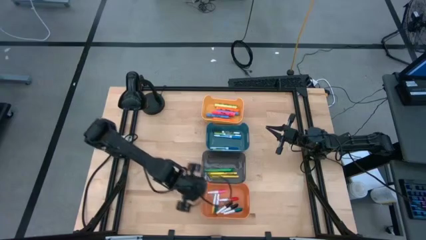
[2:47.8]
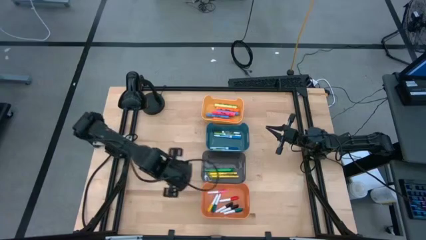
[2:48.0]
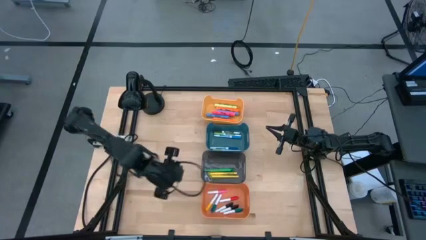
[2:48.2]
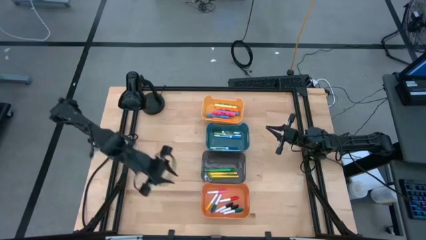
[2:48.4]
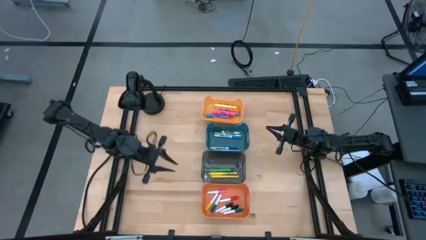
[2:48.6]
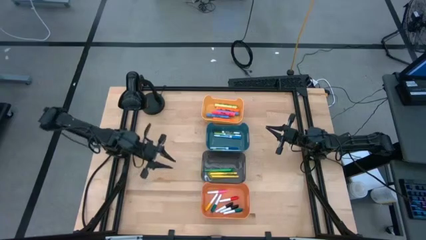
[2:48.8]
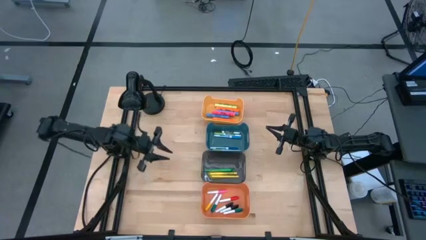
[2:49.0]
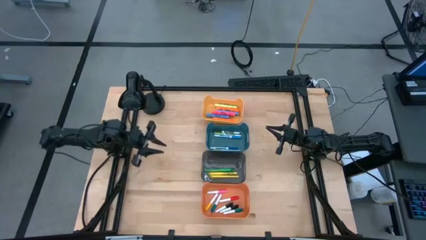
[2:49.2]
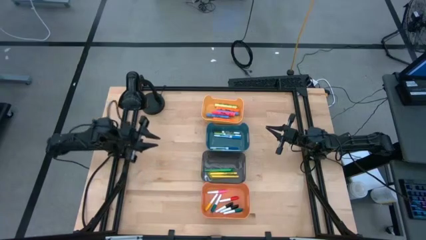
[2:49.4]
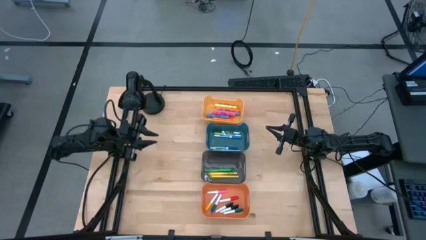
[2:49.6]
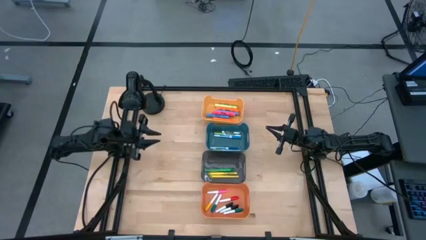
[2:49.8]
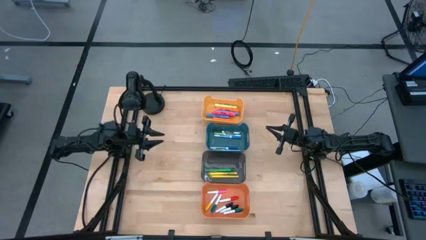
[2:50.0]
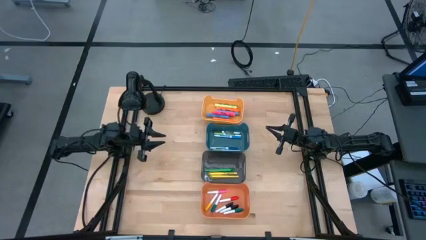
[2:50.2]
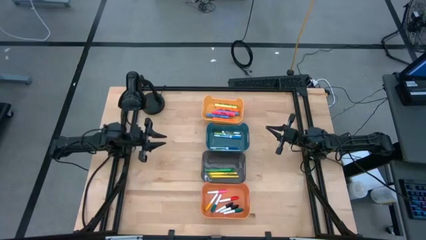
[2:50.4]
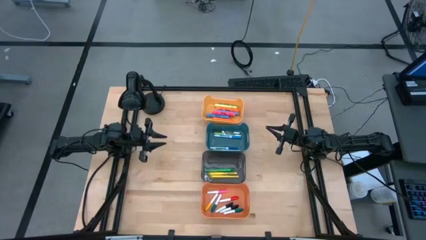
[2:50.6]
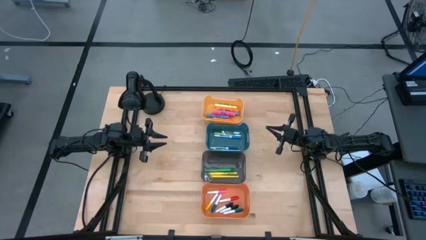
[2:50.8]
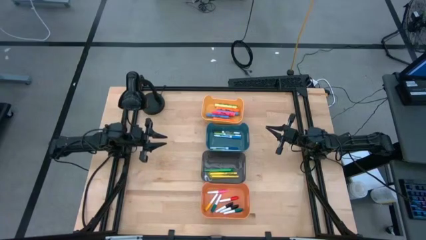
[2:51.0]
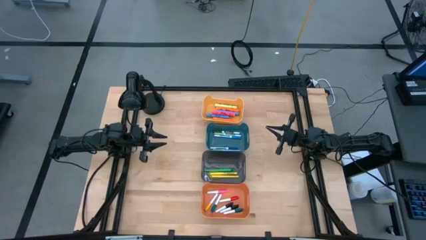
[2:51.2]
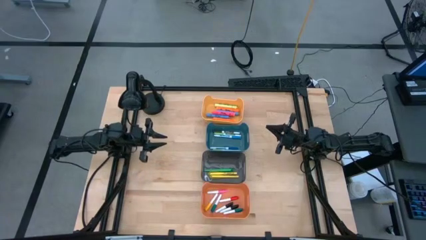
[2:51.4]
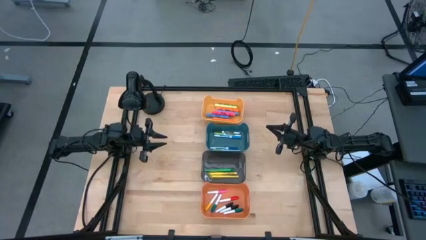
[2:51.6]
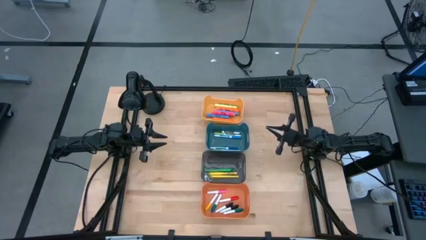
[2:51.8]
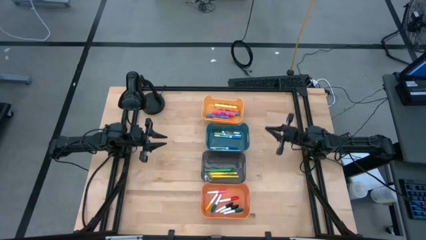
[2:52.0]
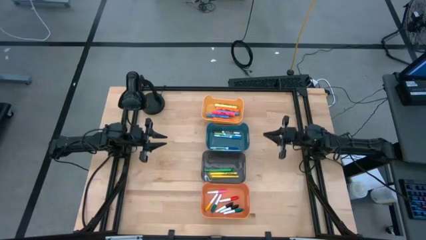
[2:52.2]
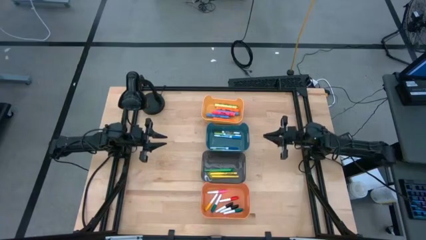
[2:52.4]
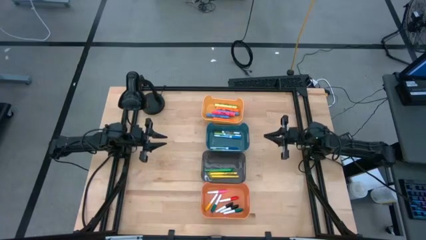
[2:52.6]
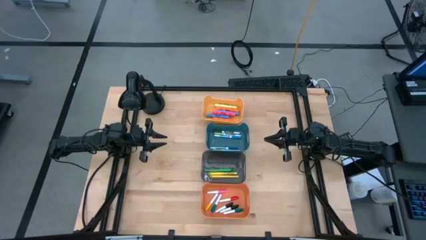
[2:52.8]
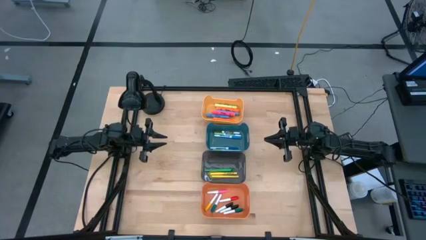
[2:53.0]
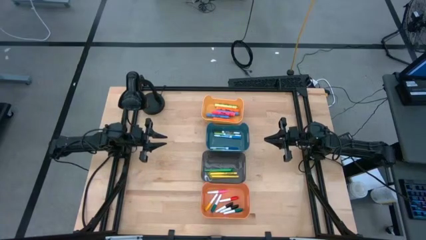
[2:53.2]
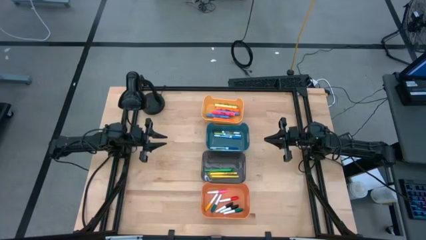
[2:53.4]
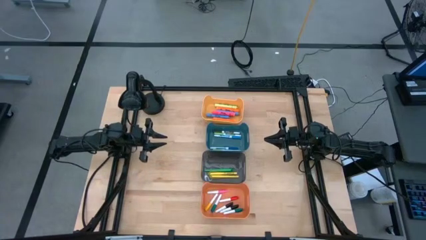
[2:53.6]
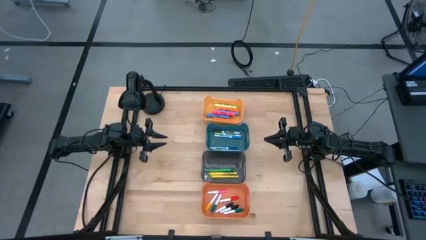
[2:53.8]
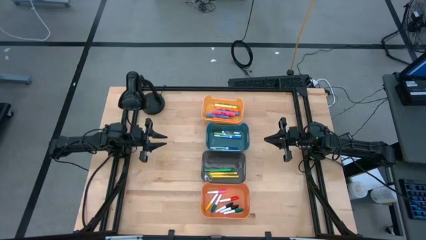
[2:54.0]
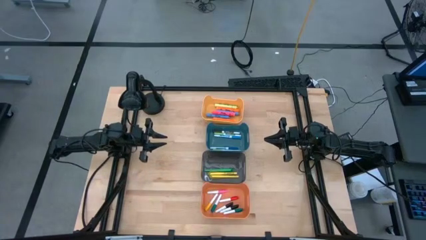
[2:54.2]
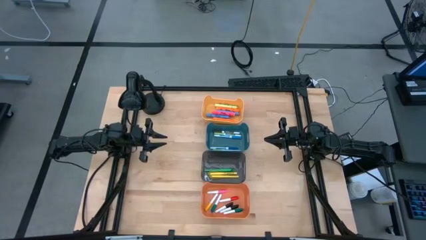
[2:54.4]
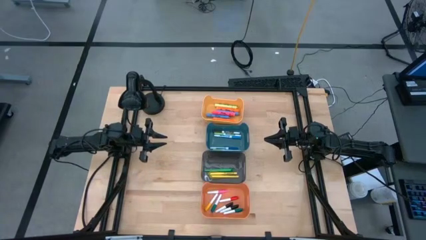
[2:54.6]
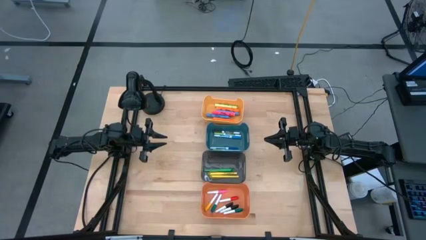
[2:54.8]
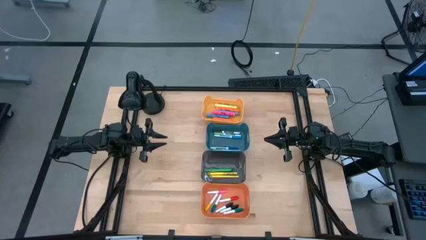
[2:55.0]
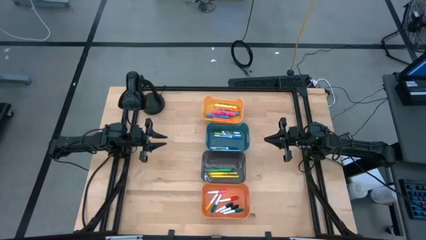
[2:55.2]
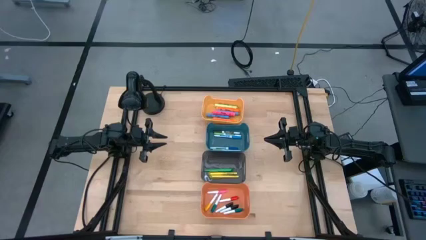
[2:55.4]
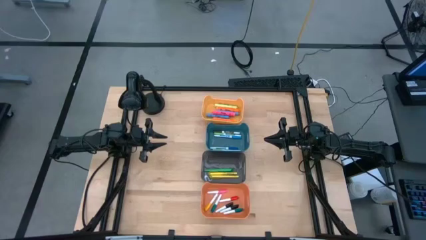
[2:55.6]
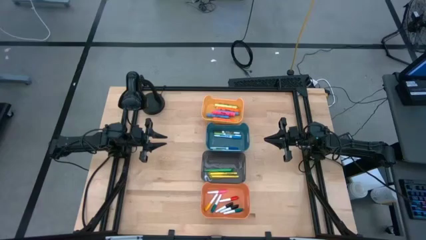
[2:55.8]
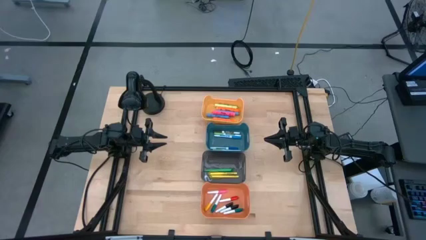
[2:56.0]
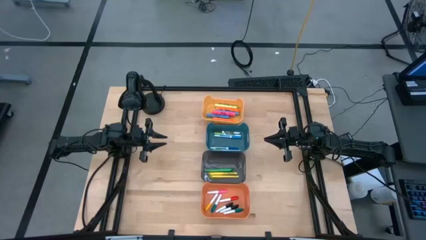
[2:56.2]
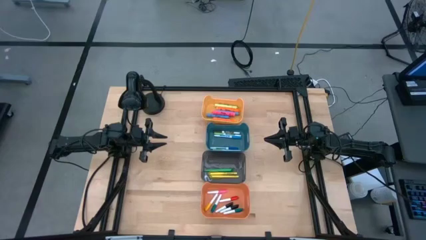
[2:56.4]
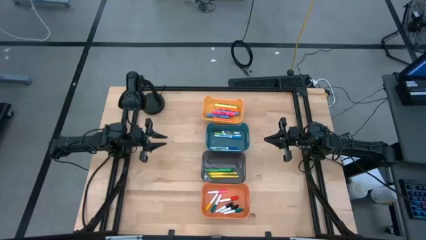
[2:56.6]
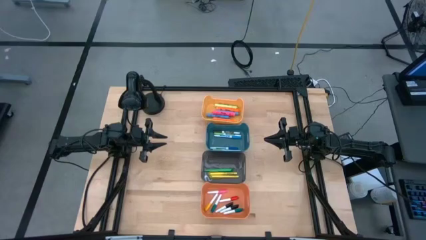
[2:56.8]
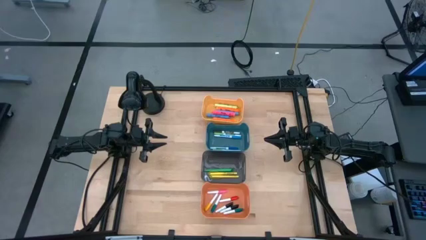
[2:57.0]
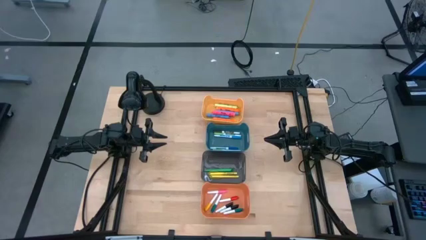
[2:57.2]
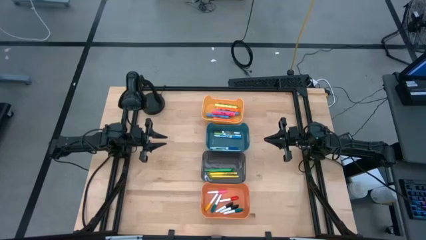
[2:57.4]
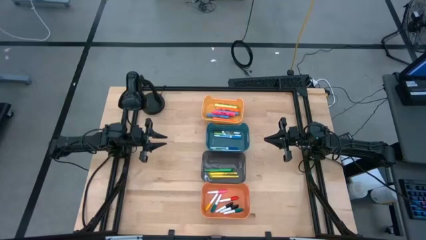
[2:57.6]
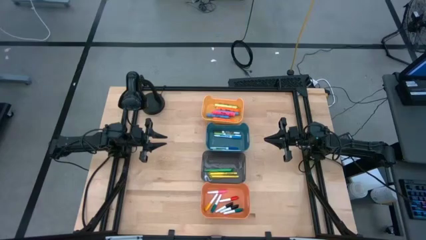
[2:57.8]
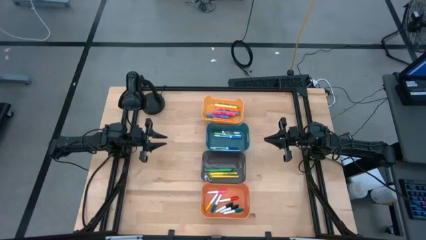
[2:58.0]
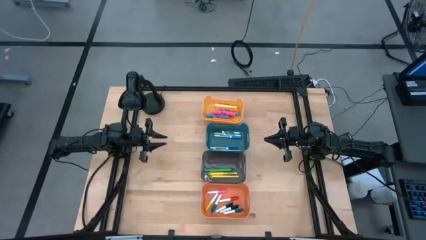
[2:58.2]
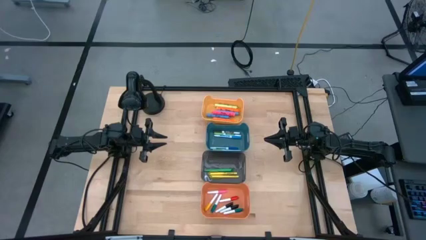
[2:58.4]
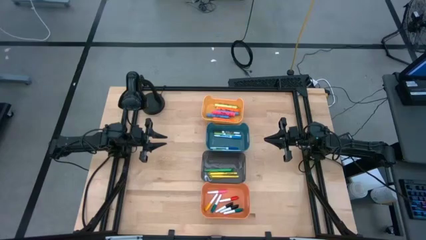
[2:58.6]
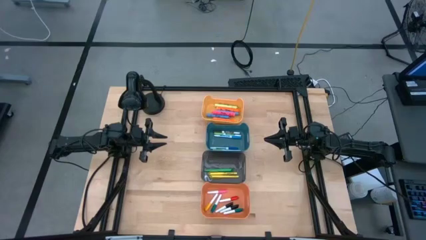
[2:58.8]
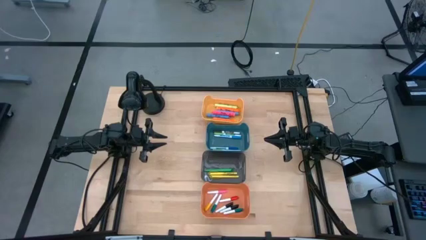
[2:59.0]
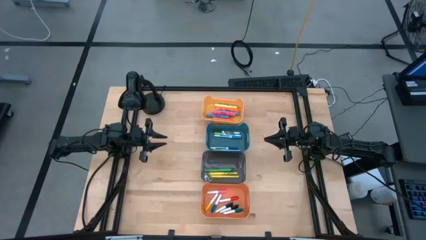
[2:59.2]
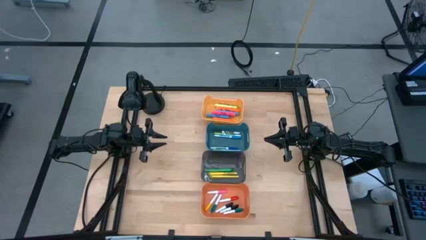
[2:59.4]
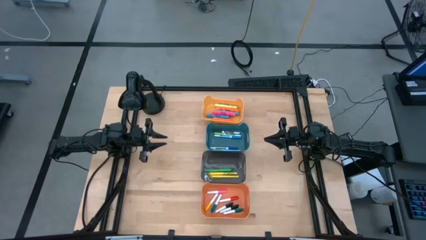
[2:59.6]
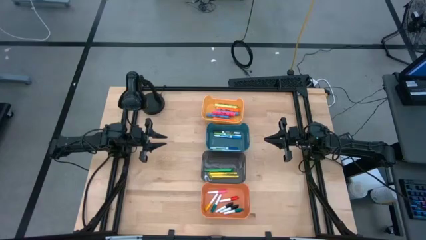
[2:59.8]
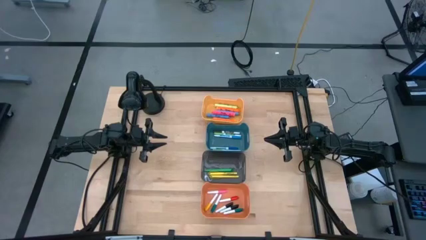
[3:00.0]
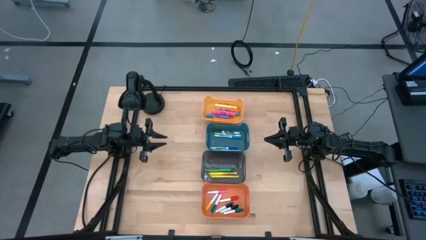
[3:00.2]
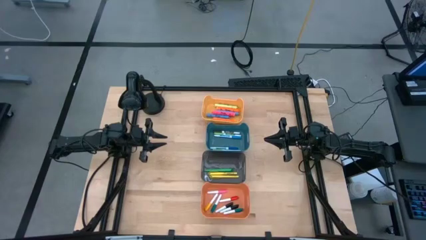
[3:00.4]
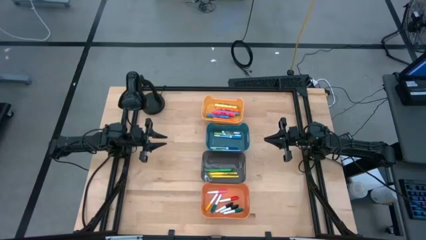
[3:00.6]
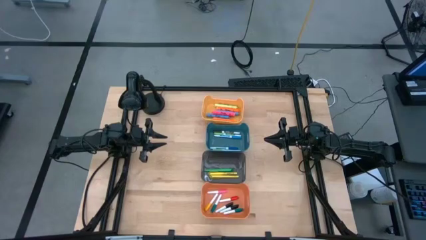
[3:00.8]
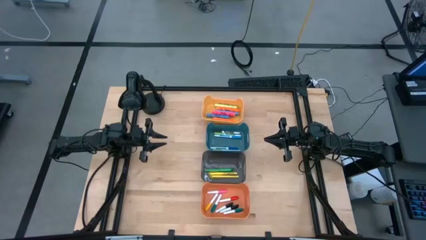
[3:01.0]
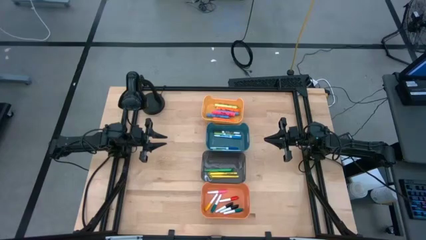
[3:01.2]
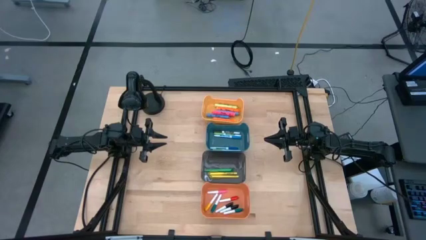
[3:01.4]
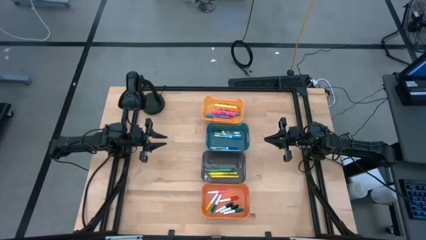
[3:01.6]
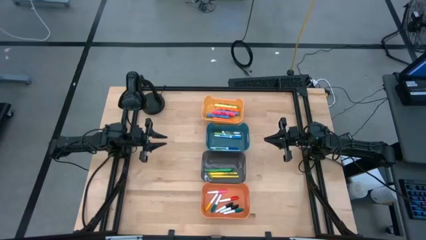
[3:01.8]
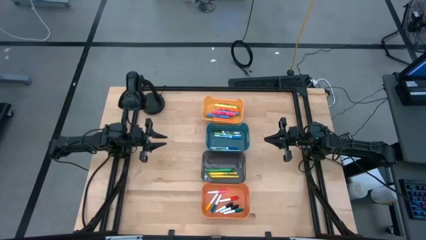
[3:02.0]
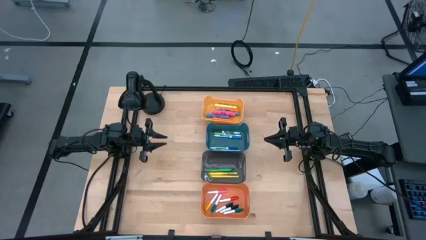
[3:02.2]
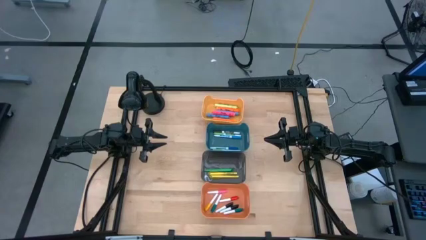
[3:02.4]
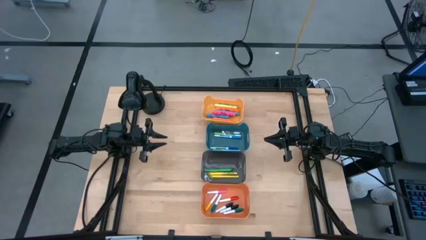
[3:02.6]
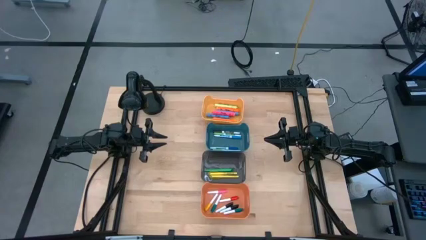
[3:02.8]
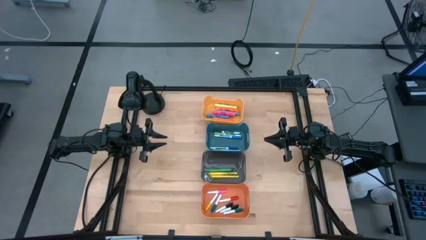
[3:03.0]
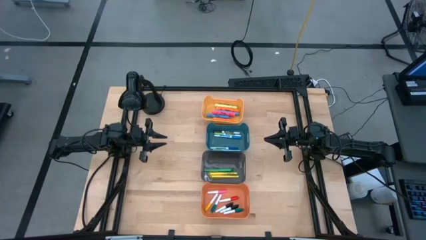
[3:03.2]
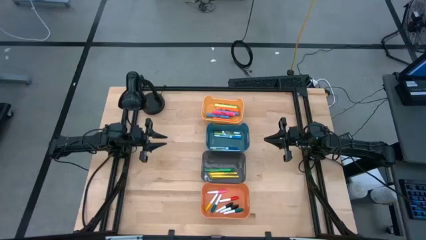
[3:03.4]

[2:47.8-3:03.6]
Task: Pick & Place Markers
Return to Home Position

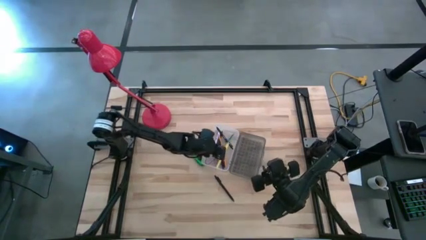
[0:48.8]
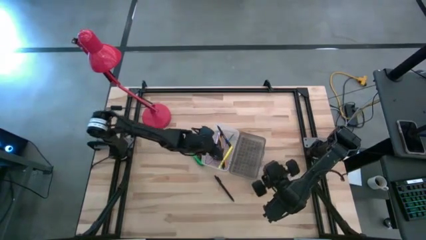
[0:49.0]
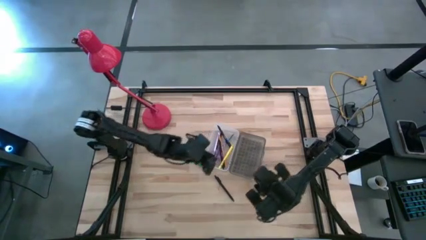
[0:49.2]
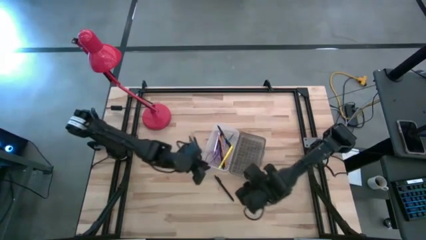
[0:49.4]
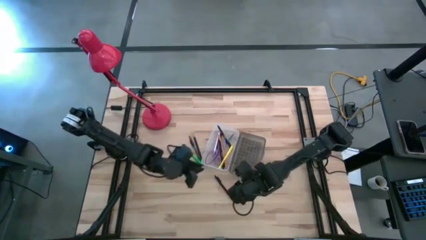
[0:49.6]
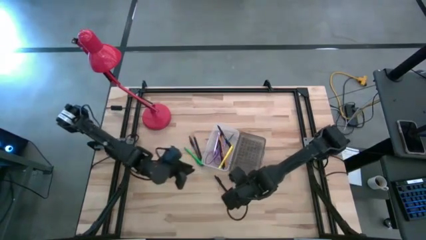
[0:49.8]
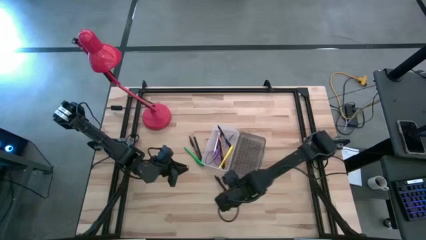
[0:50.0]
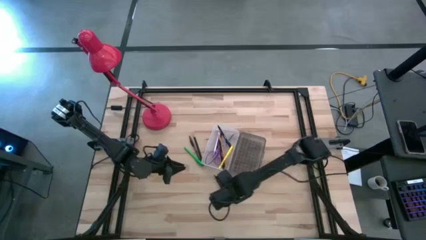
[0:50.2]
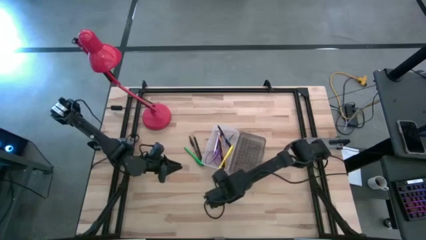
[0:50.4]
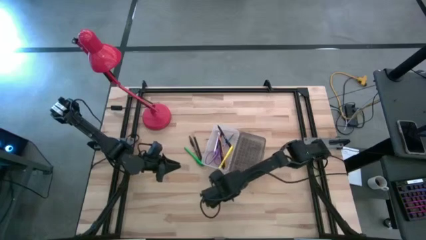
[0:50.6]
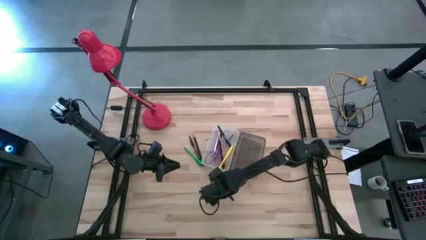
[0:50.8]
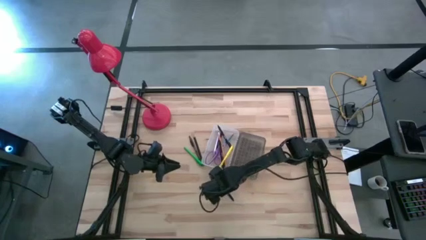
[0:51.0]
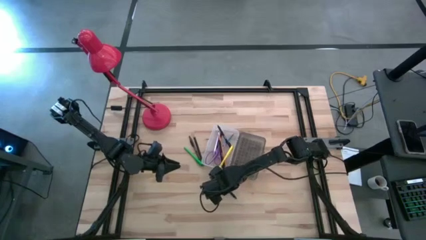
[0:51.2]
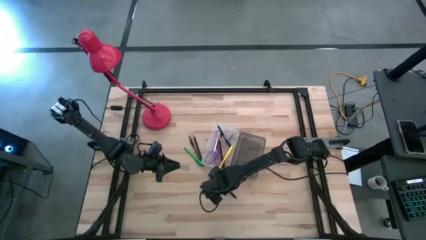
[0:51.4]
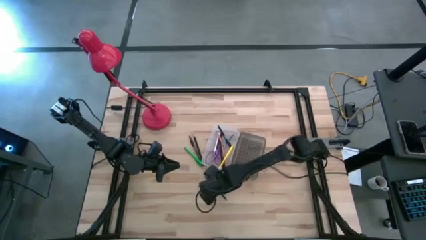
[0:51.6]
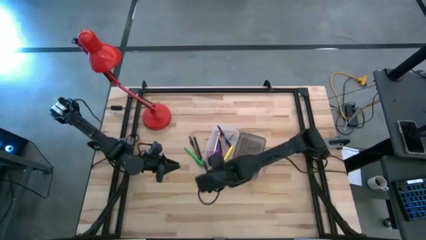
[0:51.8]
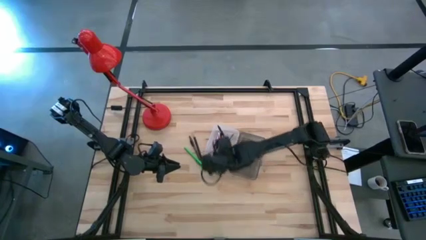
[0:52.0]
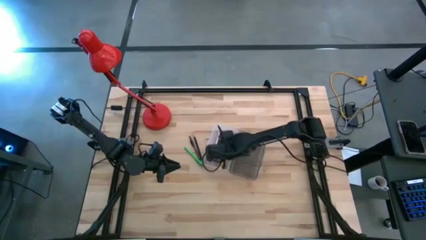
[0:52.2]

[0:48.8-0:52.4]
Task: Pick & place school supplies into a supply box
Put the bottom black pen into the supply box
